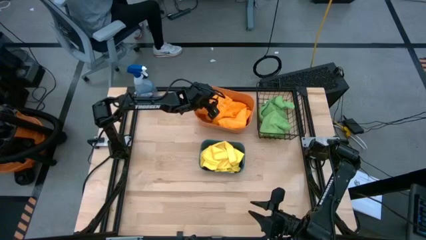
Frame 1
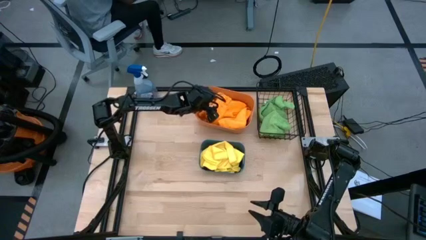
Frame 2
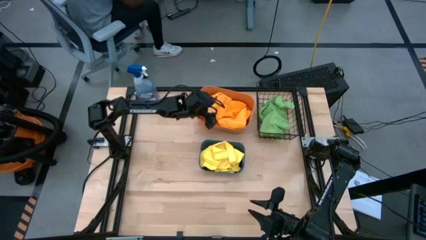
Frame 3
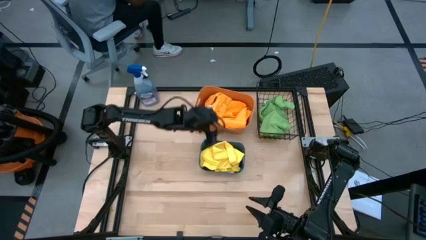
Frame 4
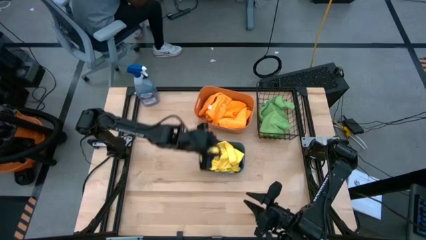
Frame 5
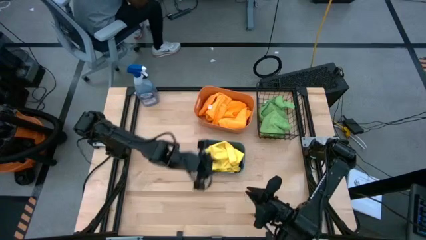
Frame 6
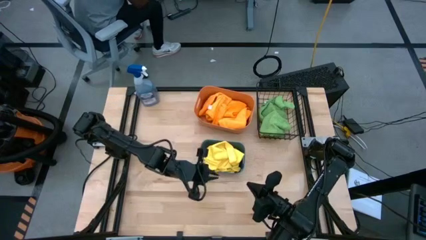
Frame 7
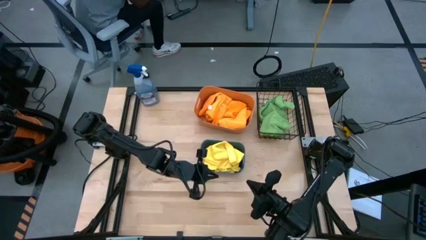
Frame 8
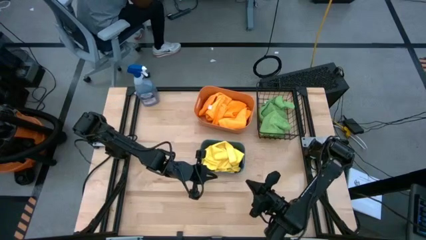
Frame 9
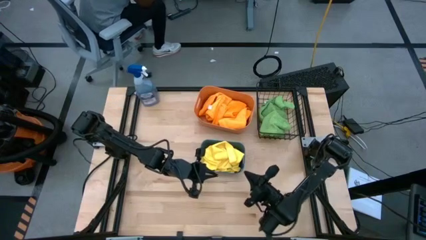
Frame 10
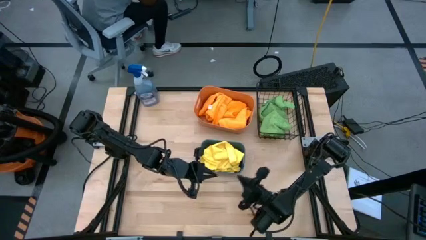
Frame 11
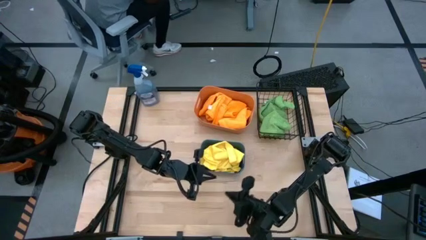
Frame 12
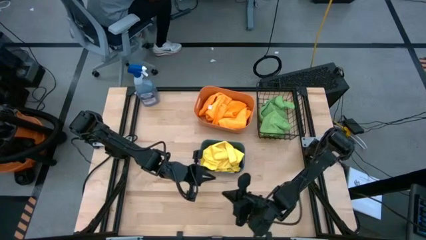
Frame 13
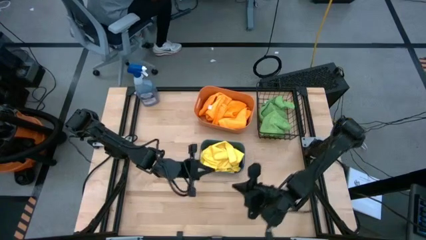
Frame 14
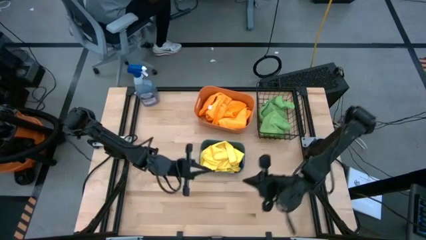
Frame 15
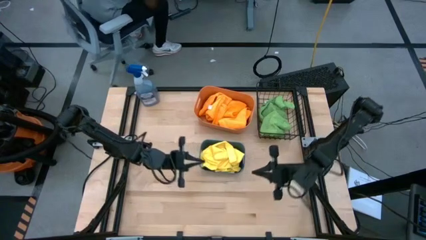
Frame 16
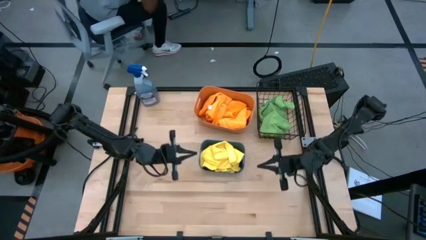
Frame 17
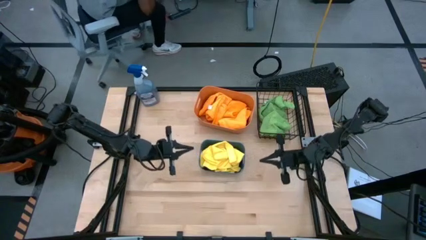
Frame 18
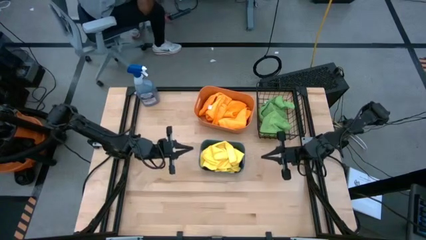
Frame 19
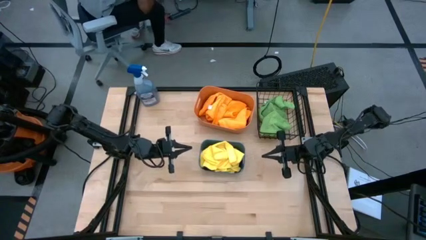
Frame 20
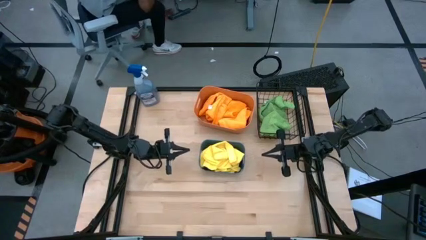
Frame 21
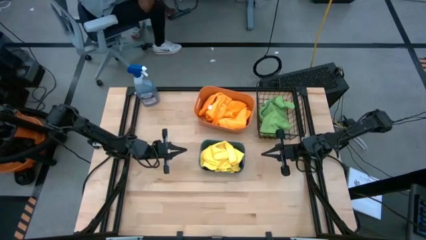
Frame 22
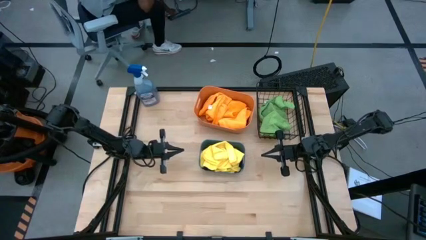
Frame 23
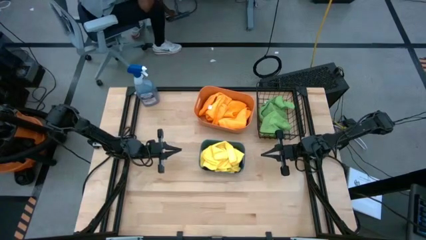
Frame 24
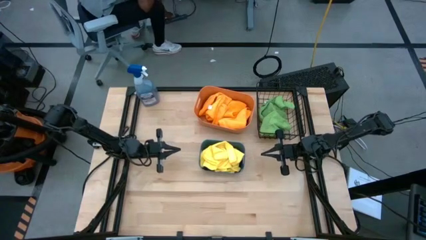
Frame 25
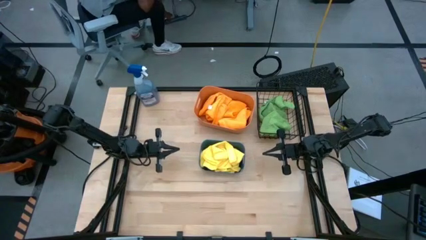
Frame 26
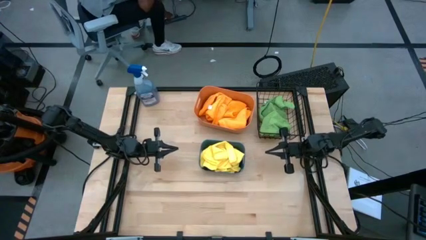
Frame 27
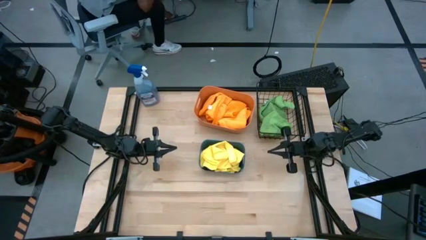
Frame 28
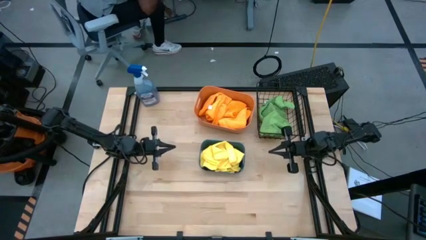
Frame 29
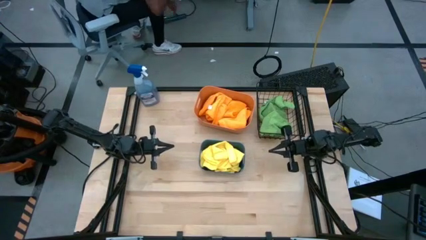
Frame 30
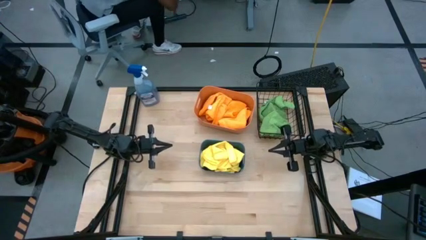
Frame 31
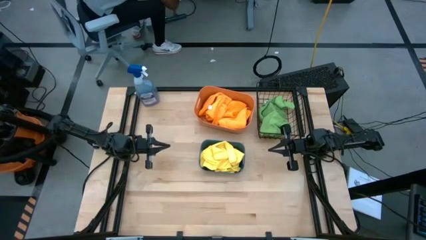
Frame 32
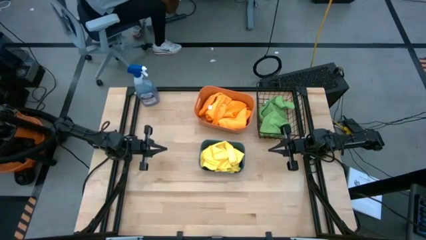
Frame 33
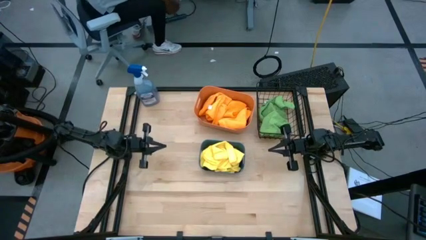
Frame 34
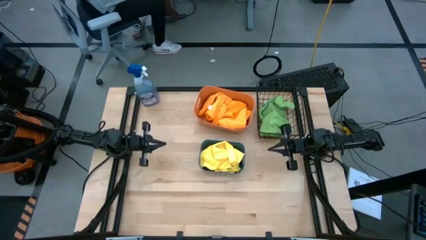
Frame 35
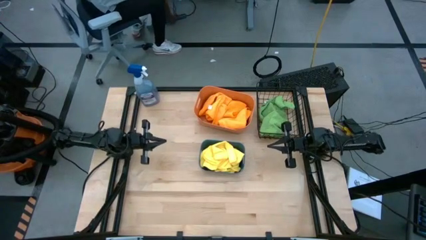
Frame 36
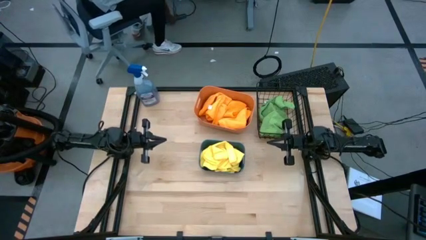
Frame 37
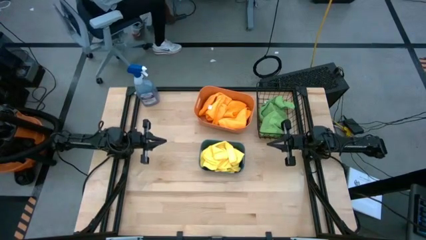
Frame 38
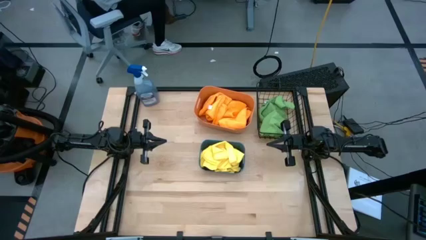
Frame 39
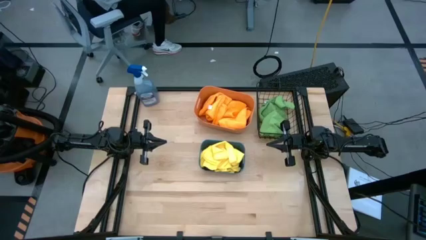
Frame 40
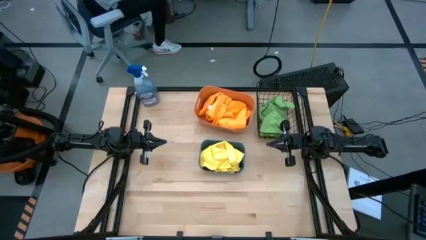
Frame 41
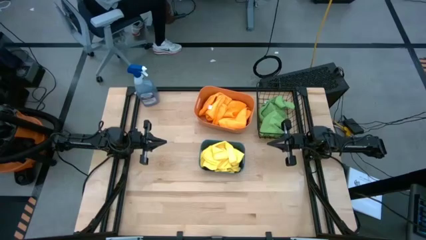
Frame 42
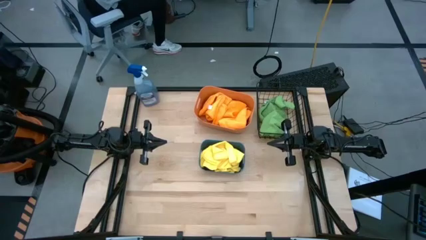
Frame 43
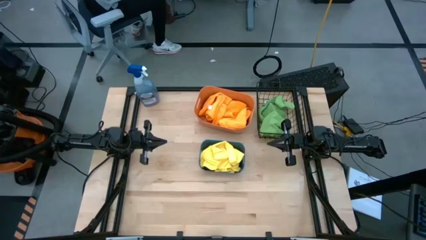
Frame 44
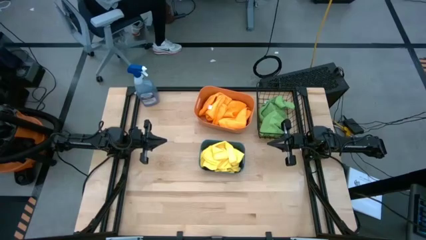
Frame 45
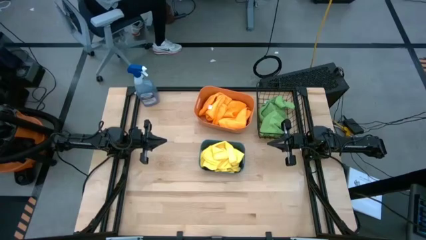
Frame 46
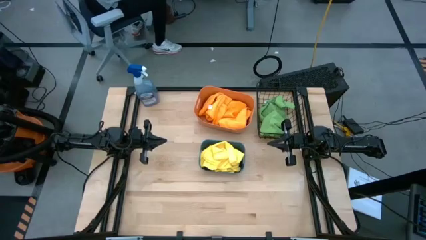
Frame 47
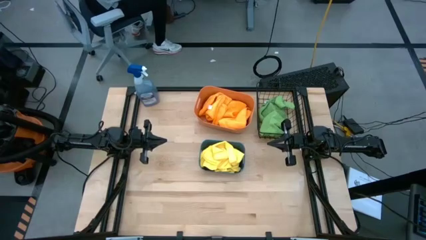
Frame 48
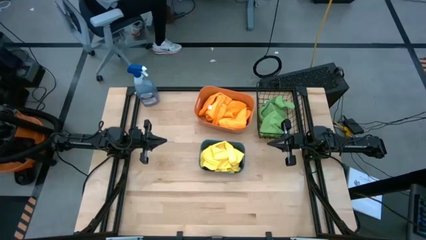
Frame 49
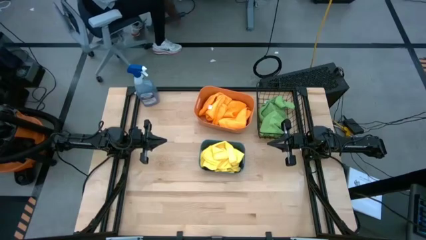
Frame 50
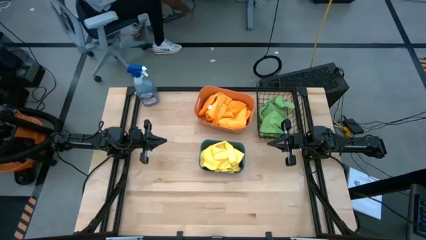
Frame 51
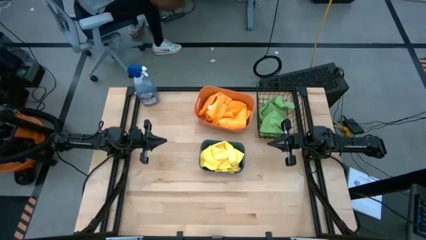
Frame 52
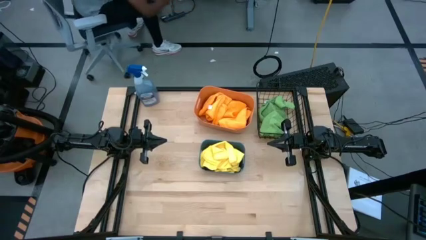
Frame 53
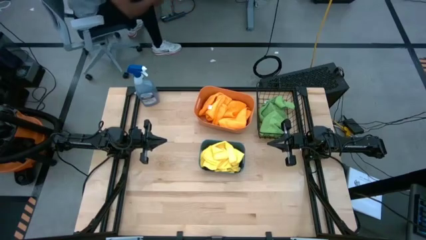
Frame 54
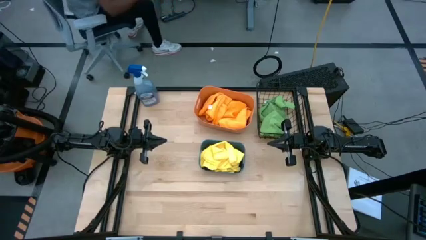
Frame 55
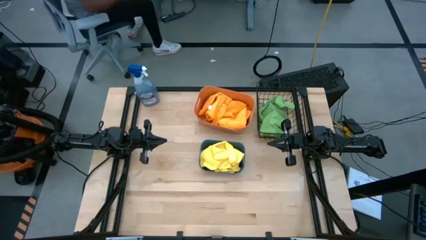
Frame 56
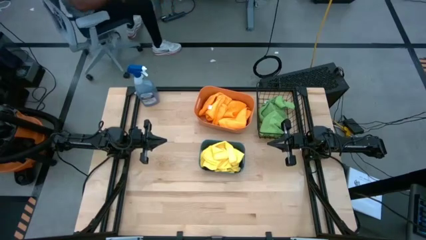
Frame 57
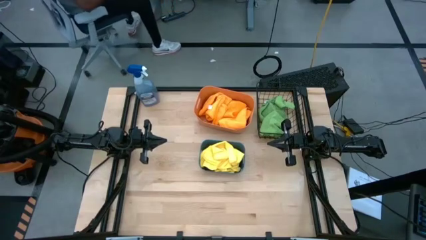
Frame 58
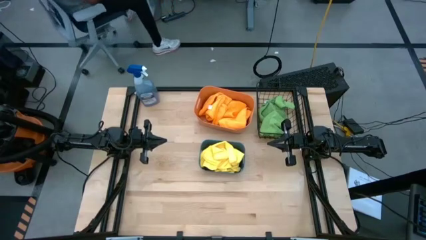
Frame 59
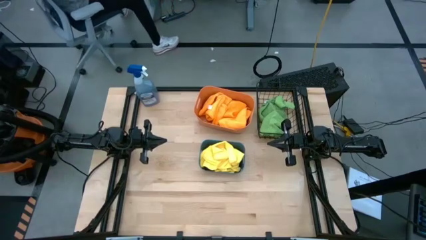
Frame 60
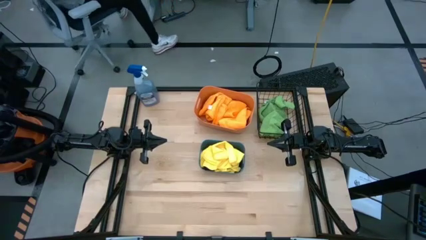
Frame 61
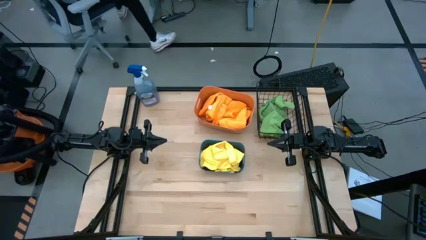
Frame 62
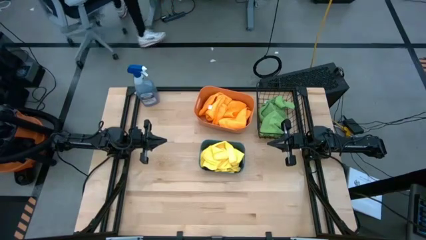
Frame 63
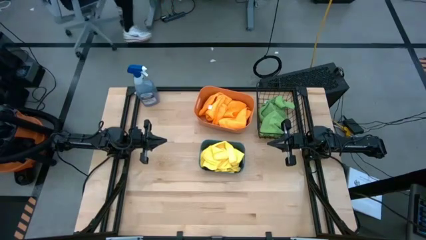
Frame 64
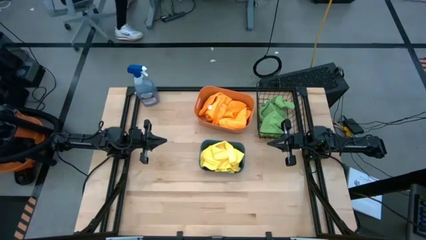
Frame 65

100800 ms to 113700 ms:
Task: Sort microfiber towel by color & place in baskets
Return to Home Position

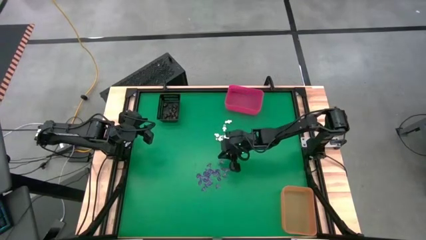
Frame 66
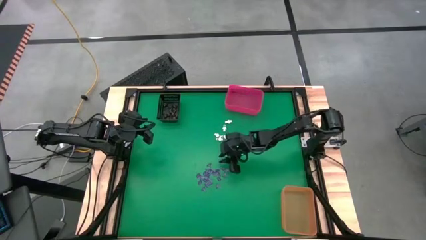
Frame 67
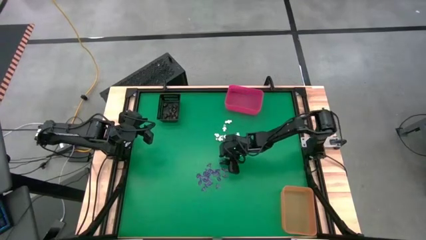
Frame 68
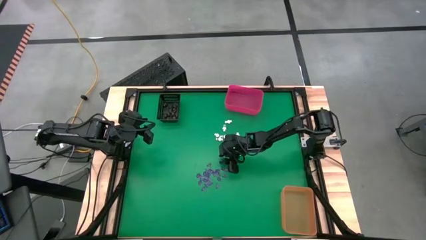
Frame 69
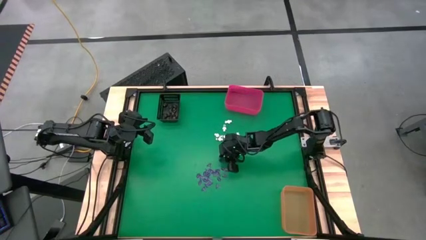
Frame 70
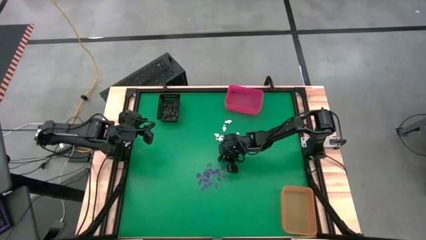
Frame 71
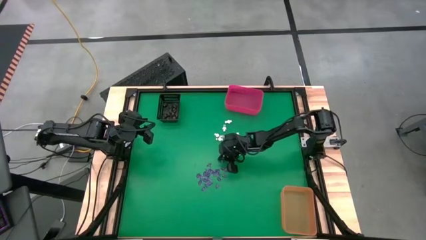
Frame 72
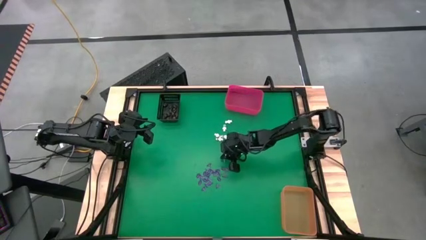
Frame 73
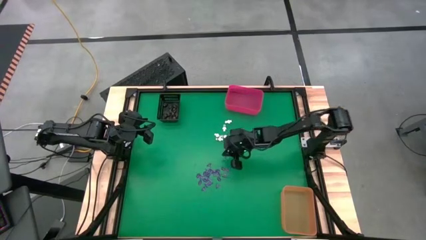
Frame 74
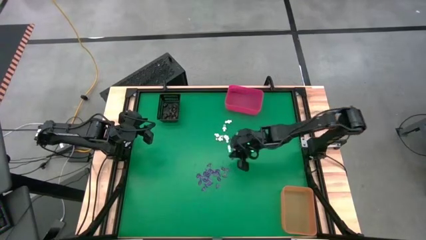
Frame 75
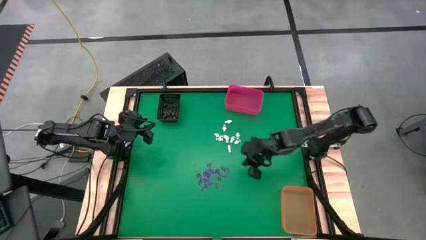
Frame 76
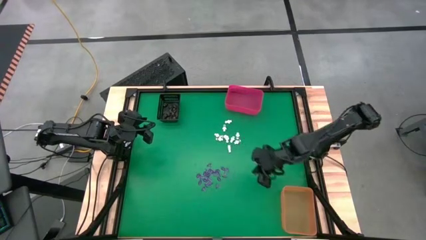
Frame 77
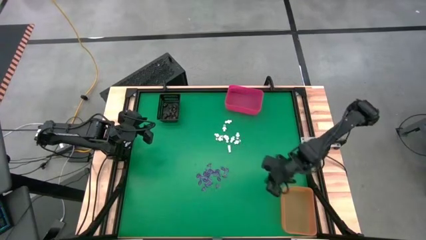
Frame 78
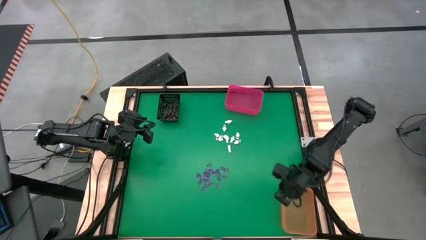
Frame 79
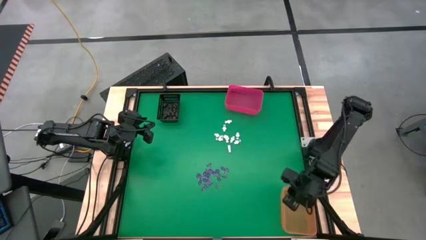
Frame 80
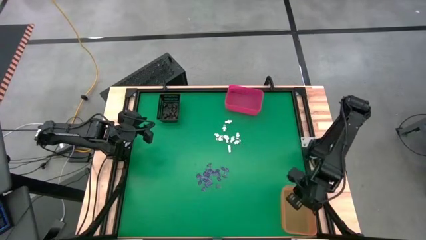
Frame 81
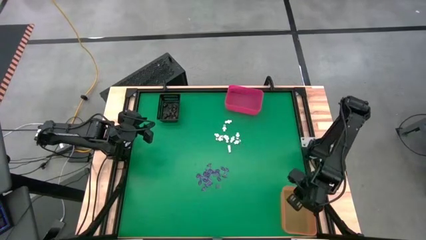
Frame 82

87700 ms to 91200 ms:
Task: Sort Halloween decoration
Put the pink witch hat toy into the orange bin
